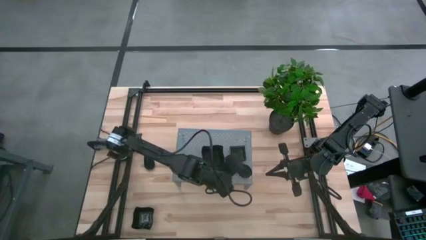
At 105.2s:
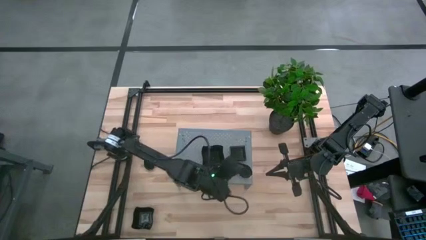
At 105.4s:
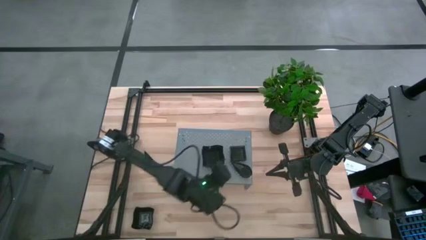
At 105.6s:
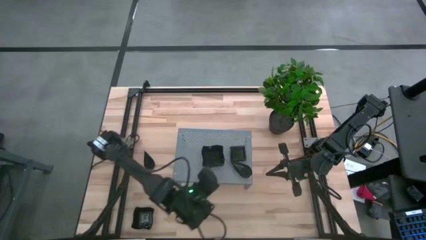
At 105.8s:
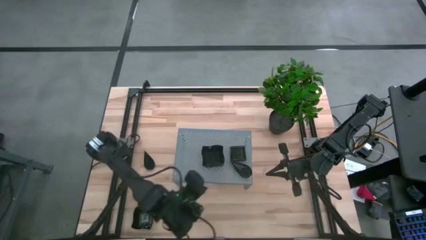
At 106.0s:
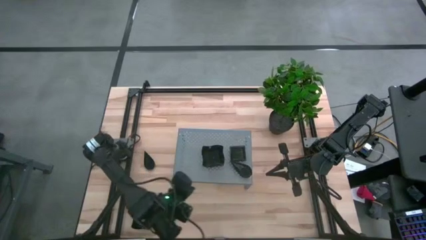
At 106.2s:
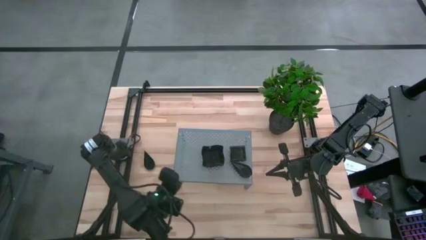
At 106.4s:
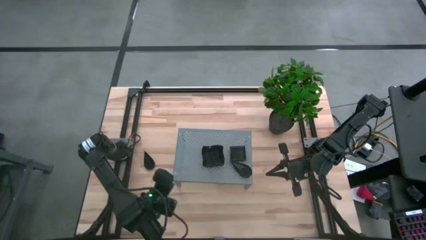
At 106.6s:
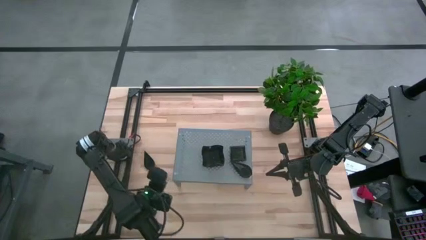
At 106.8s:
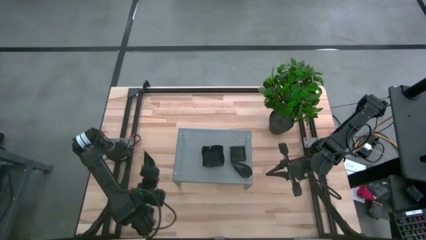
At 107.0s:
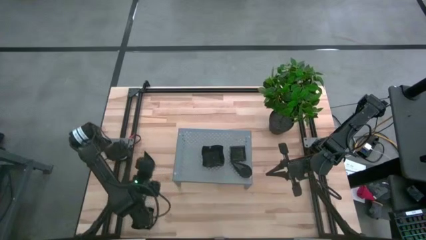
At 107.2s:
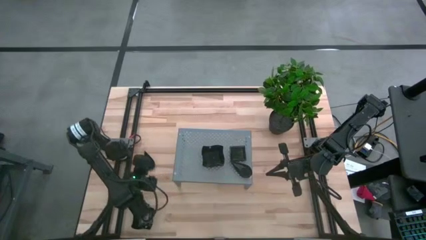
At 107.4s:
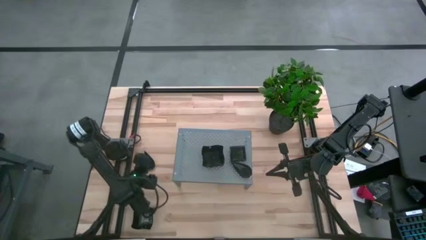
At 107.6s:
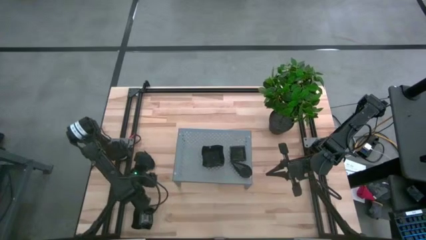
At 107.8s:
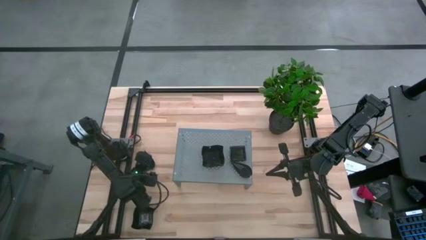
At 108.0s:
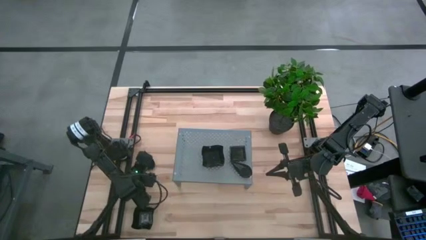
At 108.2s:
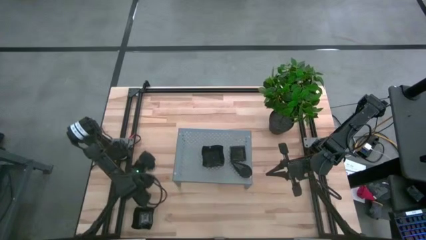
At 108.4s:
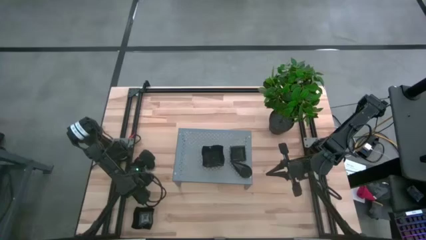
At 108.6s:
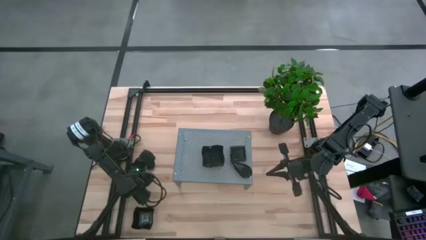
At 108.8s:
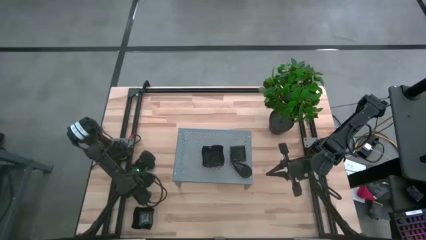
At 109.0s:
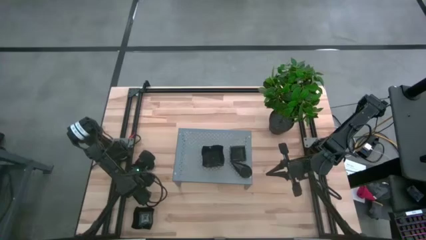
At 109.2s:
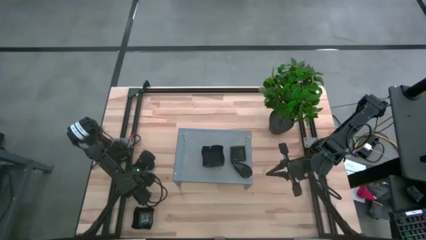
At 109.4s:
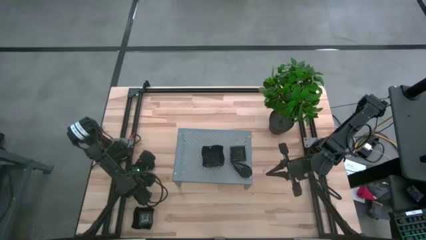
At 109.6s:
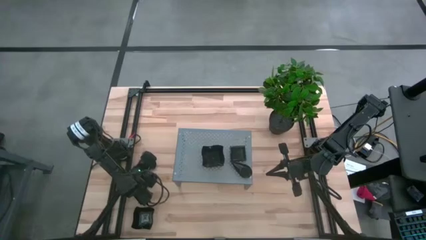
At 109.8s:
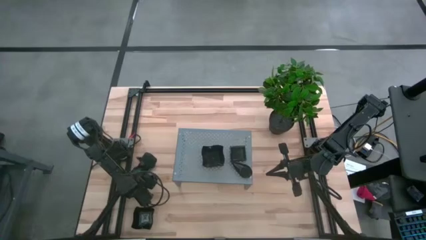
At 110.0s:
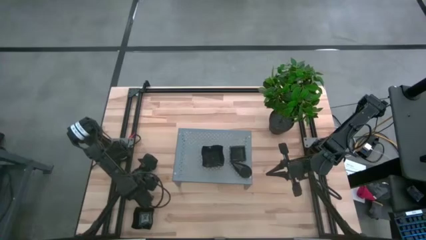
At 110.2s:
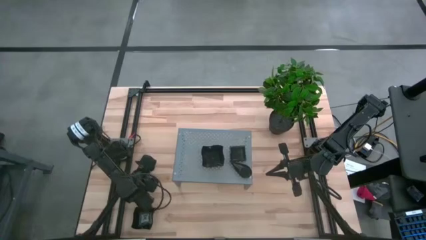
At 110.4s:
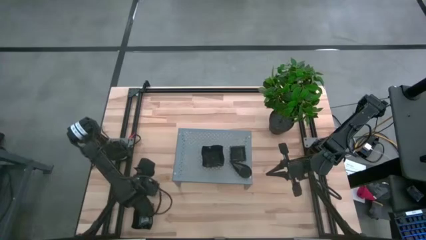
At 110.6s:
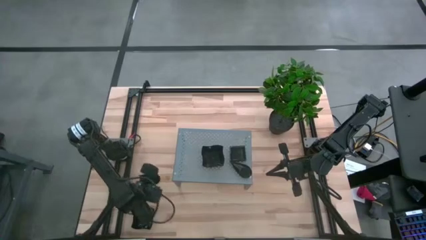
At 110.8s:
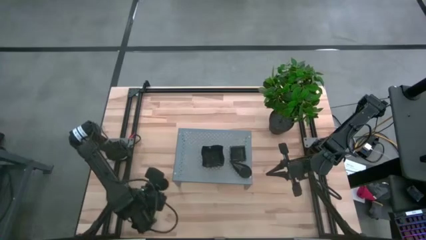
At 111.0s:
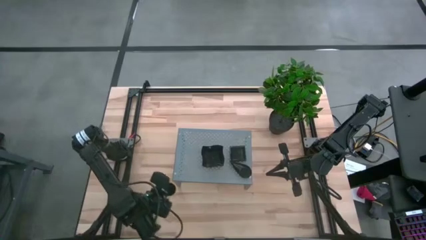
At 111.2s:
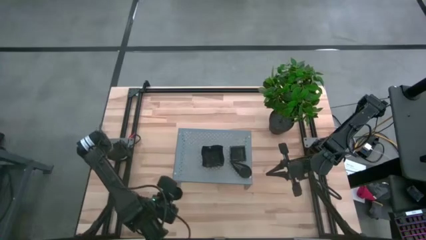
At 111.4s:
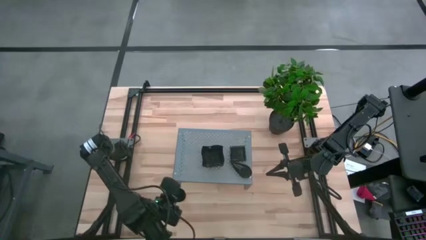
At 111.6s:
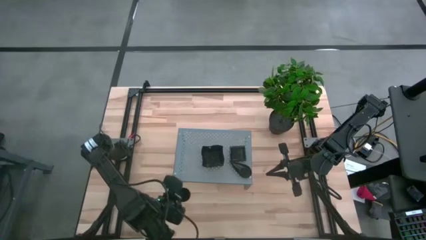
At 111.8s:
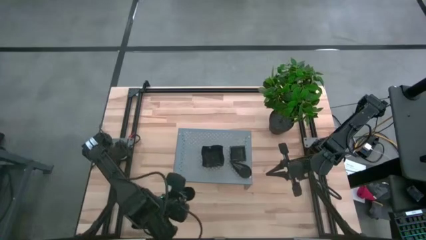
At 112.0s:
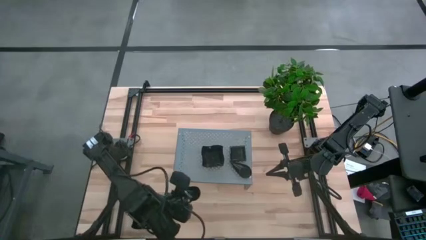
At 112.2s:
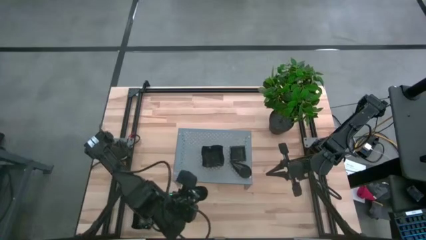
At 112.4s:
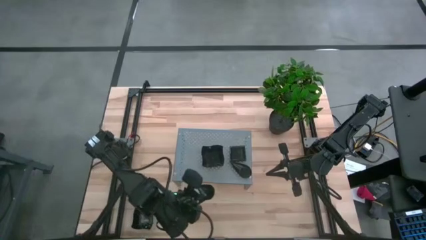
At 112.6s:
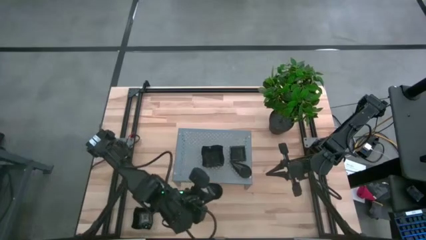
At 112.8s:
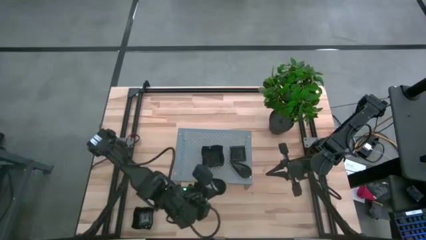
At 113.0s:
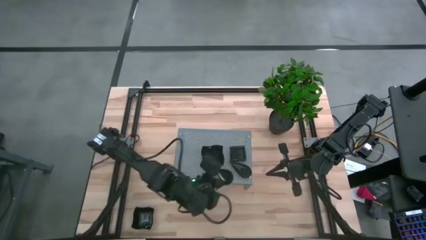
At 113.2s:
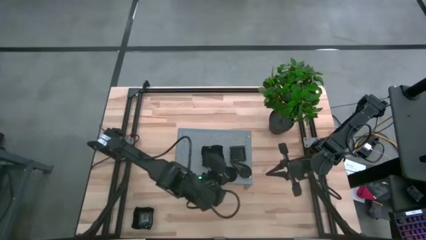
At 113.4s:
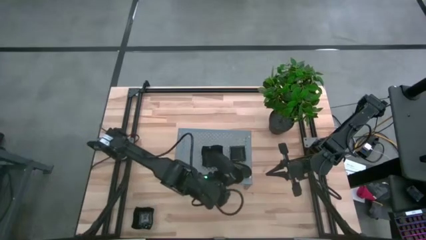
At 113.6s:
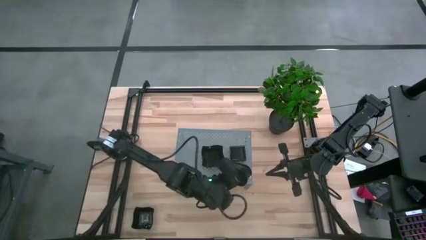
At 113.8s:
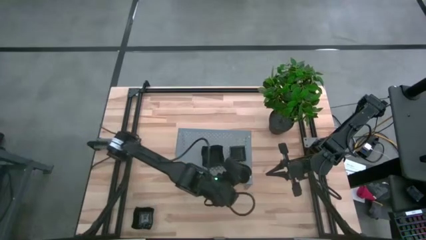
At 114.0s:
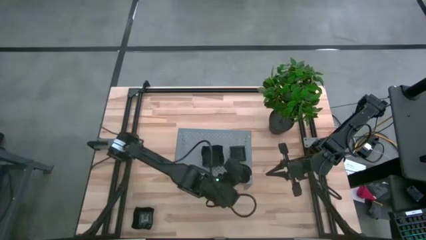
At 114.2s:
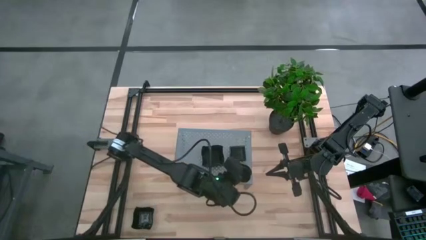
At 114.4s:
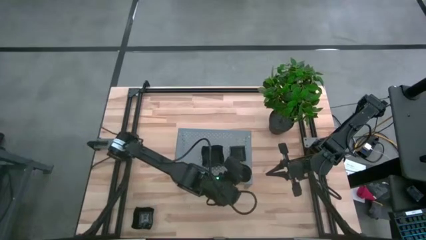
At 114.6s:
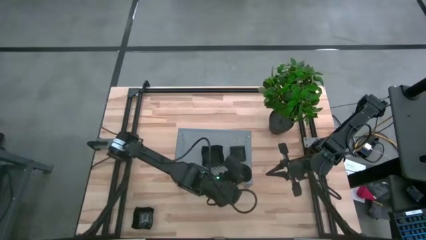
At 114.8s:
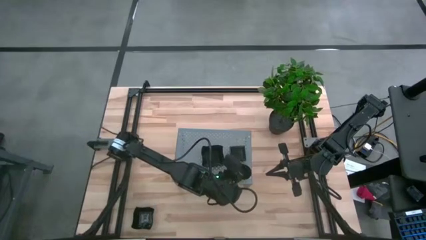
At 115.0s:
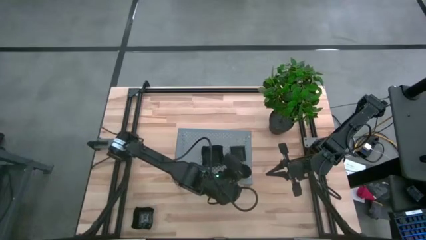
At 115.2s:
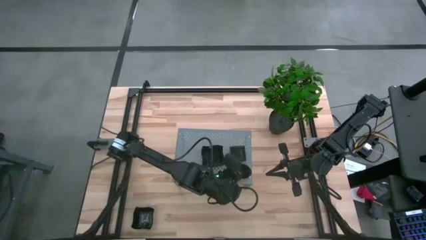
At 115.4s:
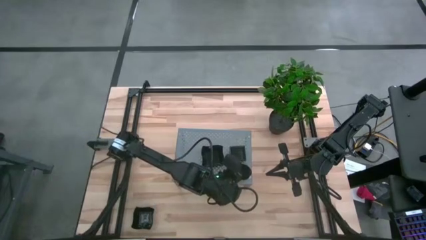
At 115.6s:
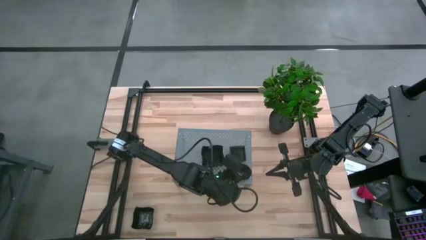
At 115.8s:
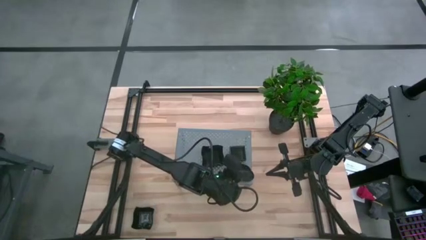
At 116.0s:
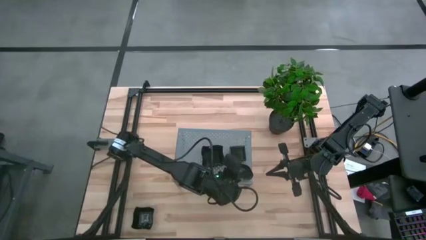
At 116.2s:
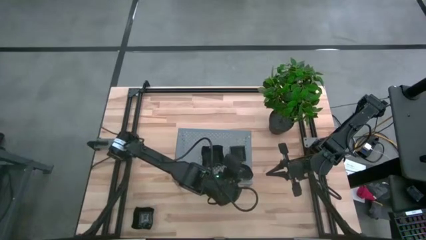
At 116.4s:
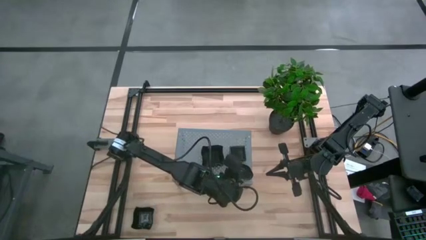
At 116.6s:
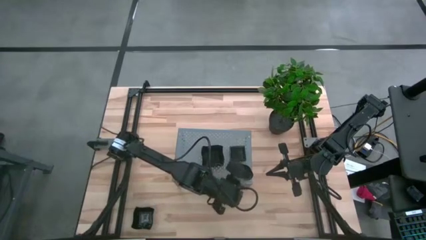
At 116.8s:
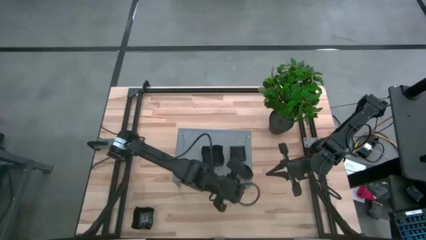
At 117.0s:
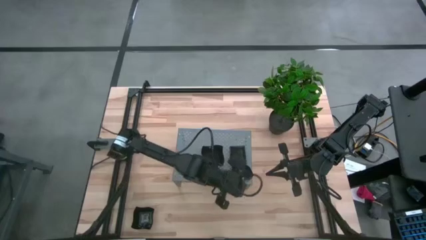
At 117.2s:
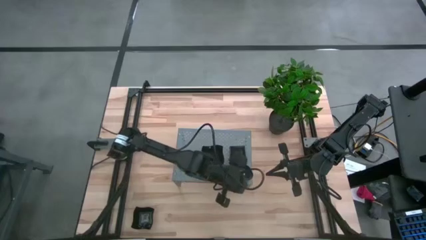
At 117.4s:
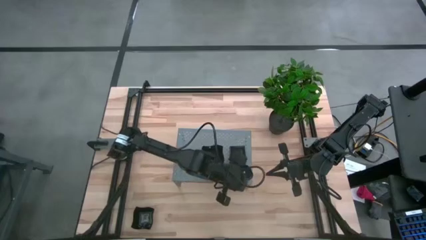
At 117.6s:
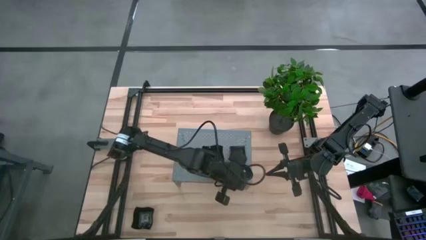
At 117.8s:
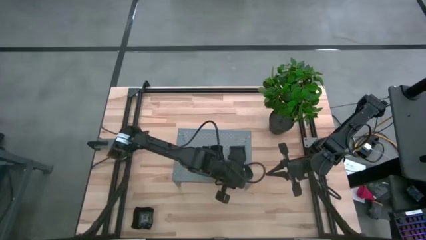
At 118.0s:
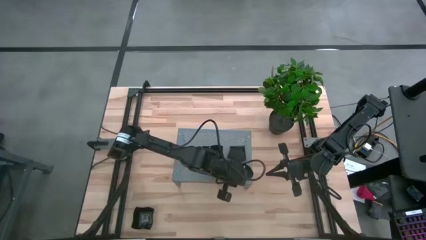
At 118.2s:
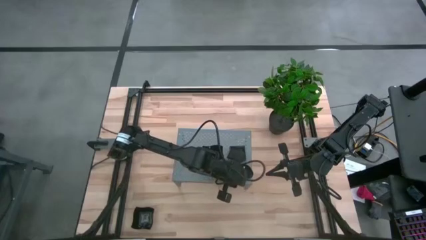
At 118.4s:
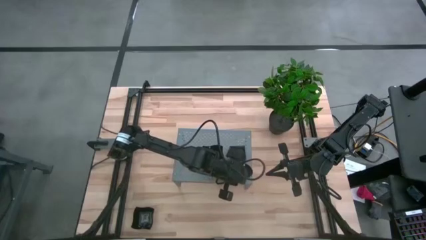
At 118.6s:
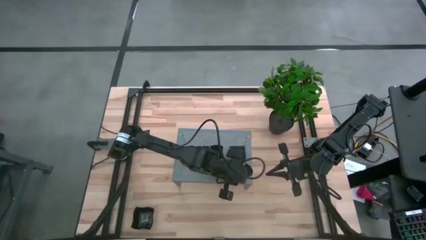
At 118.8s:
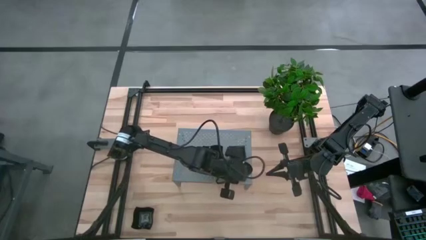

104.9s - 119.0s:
Task: Pick & Place Mini shaped plates
Stack the drop-shaped plate on the drop-shaped plates on the shelf
